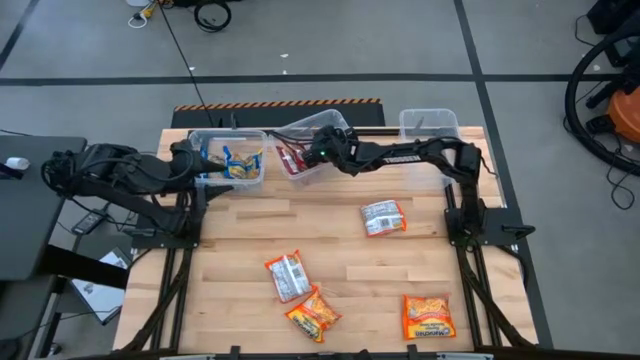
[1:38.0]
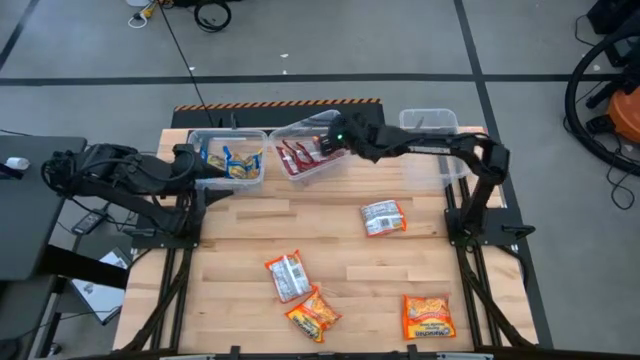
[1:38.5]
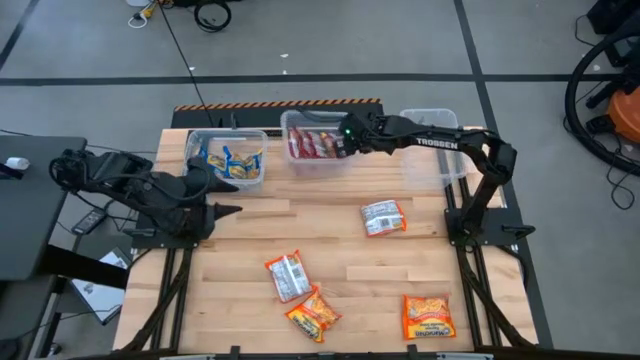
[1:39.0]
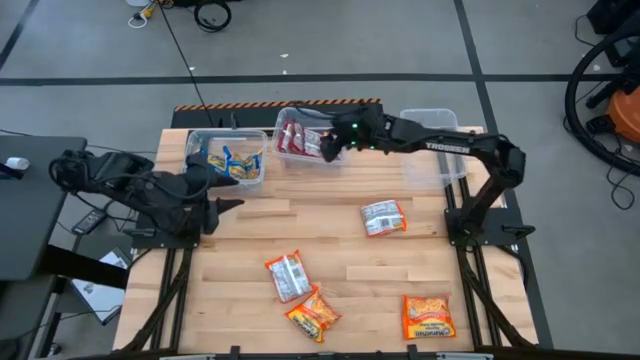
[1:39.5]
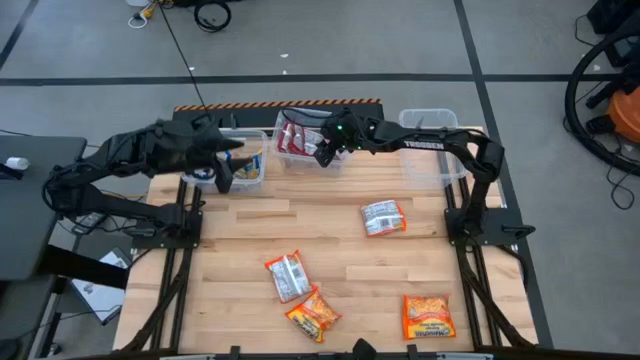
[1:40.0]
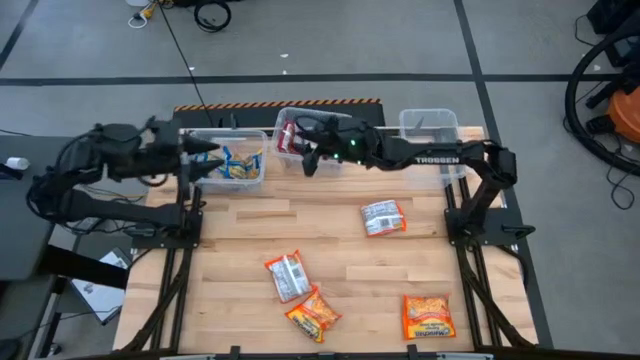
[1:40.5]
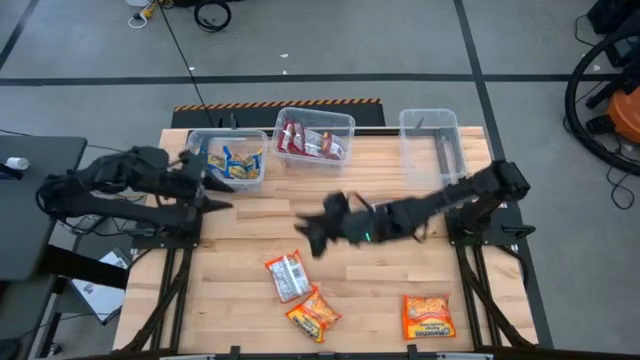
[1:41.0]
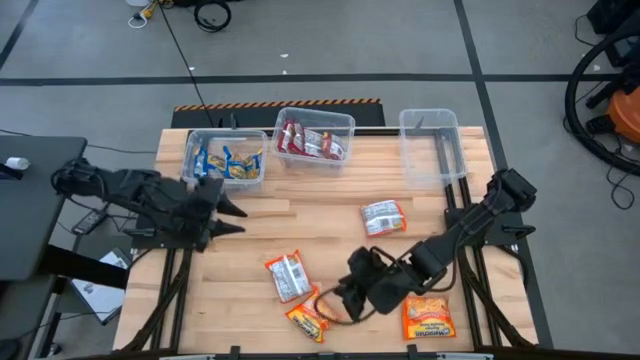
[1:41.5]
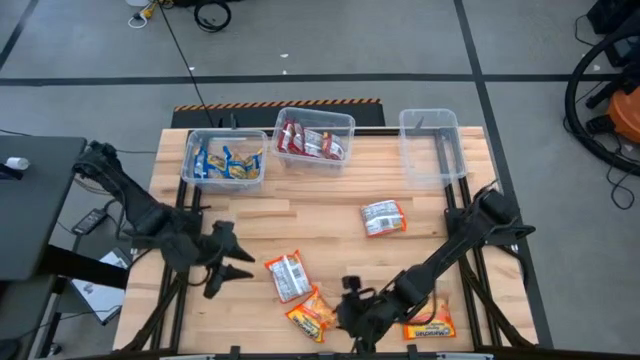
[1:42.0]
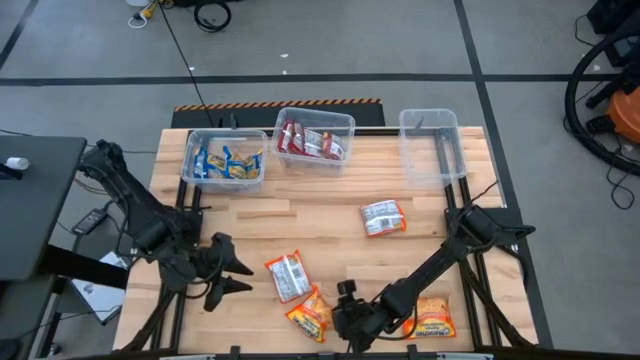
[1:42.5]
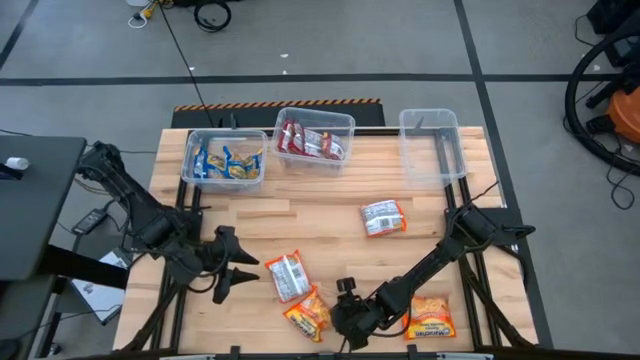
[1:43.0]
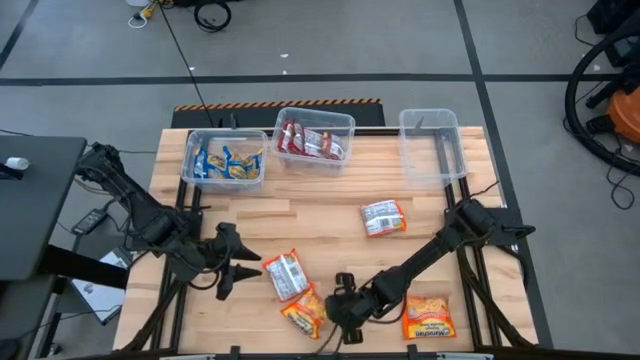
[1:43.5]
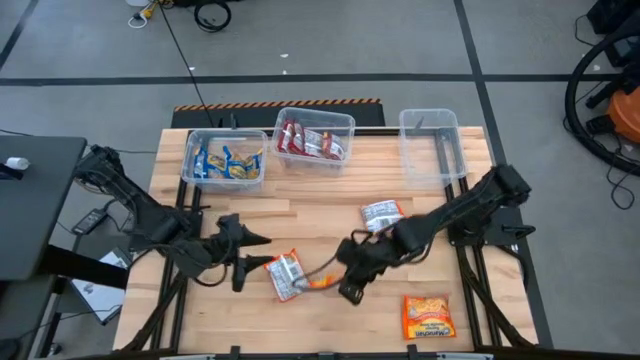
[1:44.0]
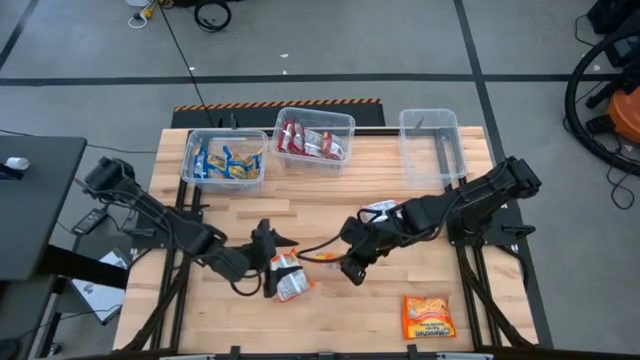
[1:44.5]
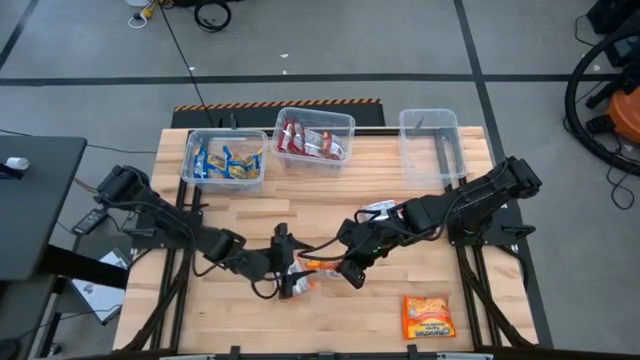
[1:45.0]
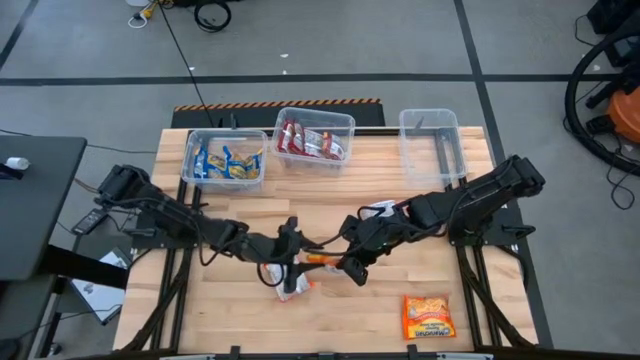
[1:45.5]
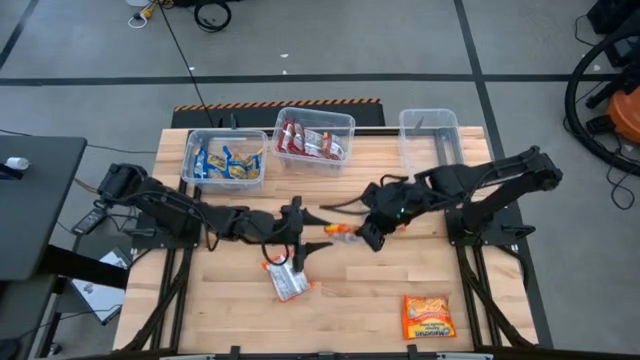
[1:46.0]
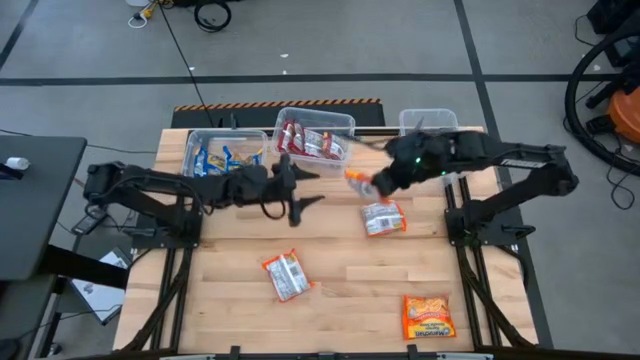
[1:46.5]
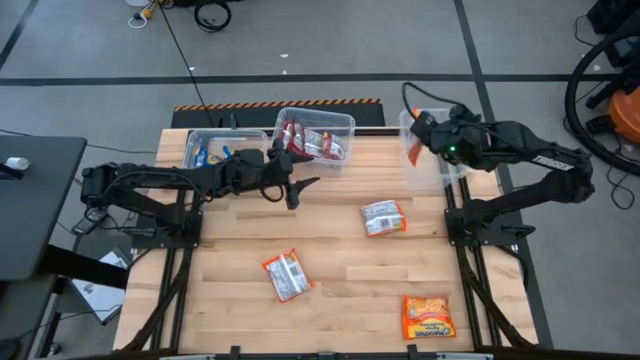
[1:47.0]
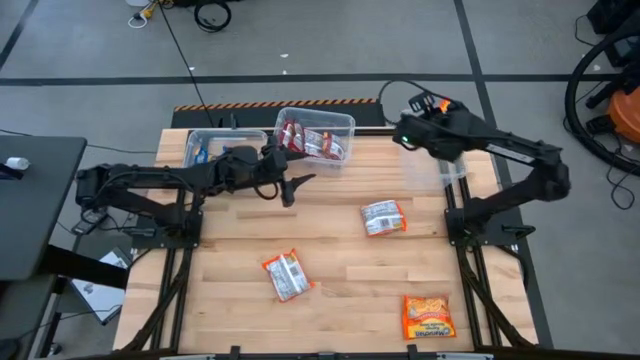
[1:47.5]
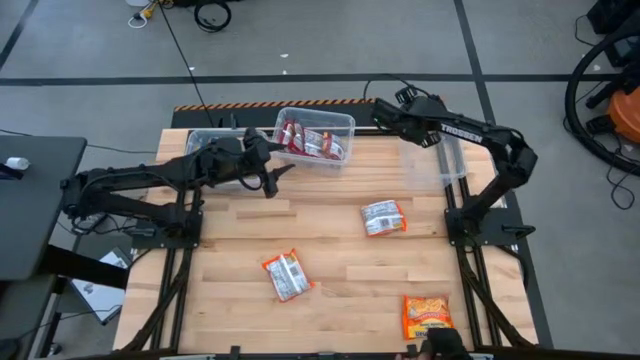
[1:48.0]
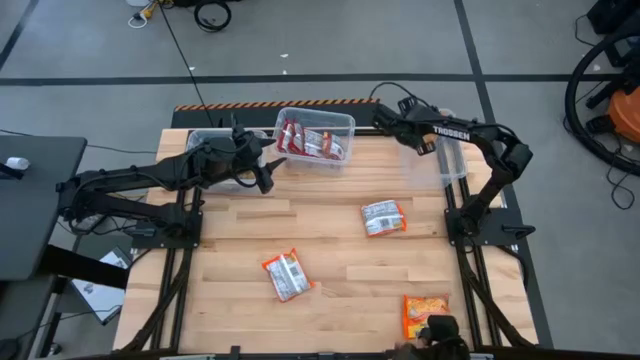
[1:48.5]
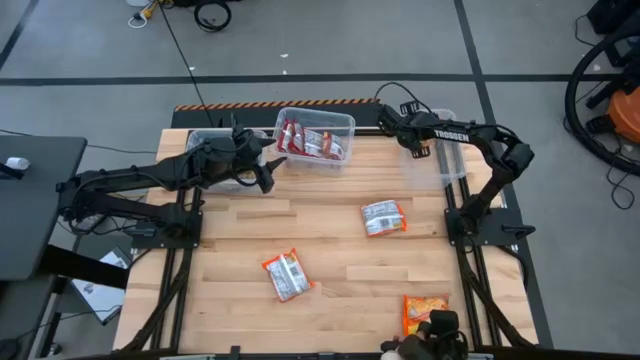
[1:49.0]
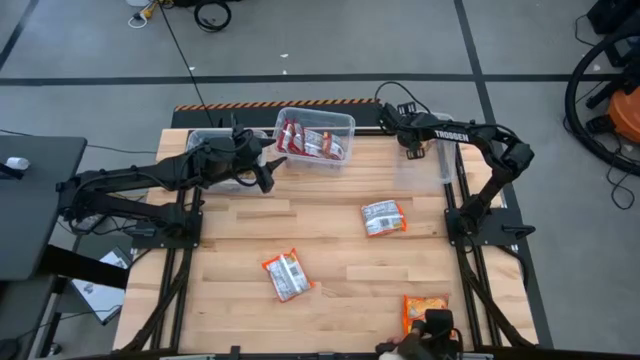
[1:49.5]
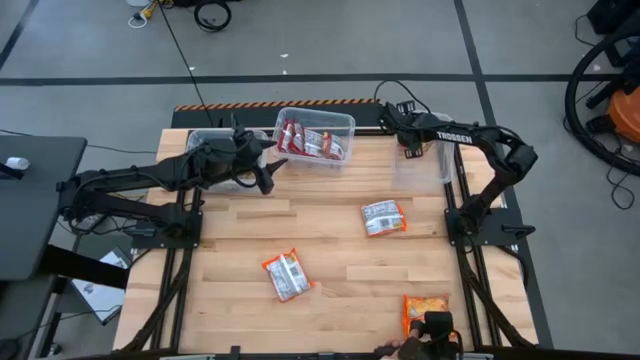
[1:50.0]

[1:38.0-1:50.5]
Task: Sort Maruchan noodles
Put the bottom left orange noodle pack into the right transparent bin

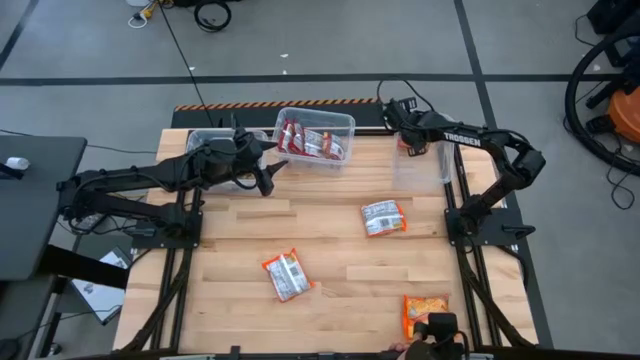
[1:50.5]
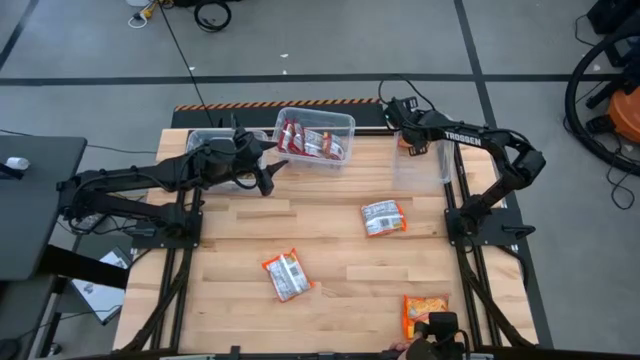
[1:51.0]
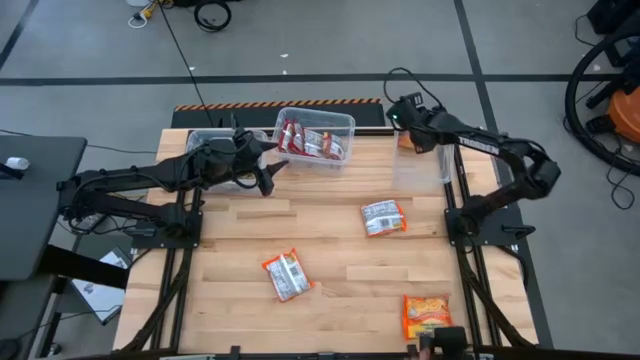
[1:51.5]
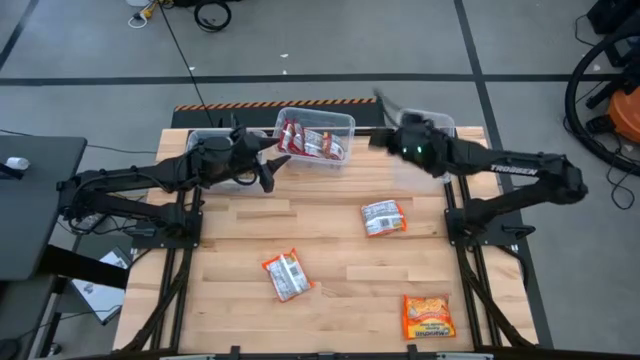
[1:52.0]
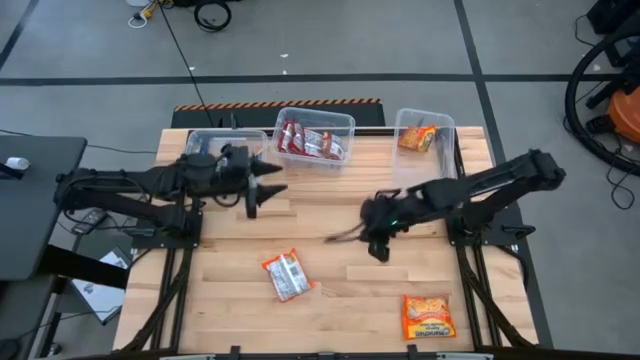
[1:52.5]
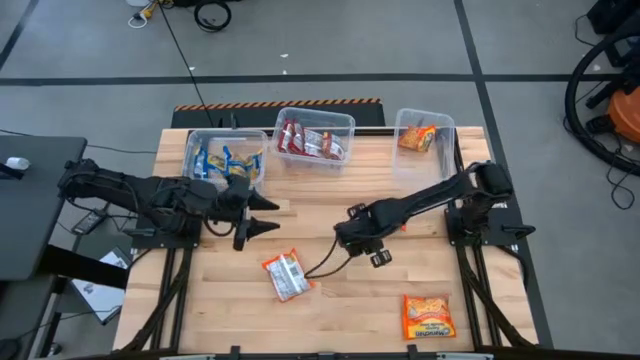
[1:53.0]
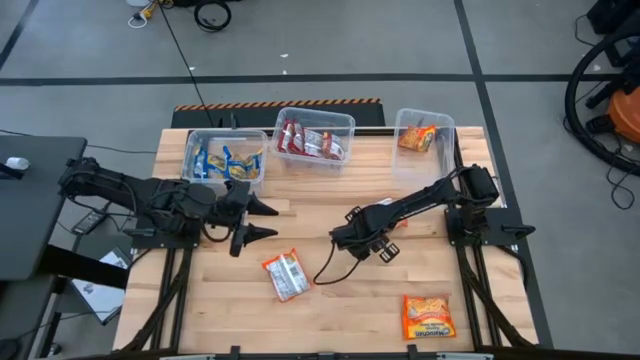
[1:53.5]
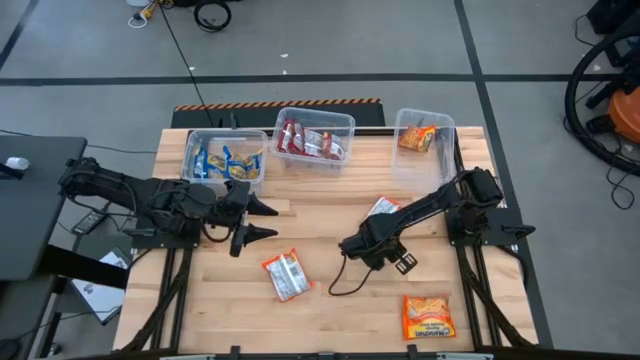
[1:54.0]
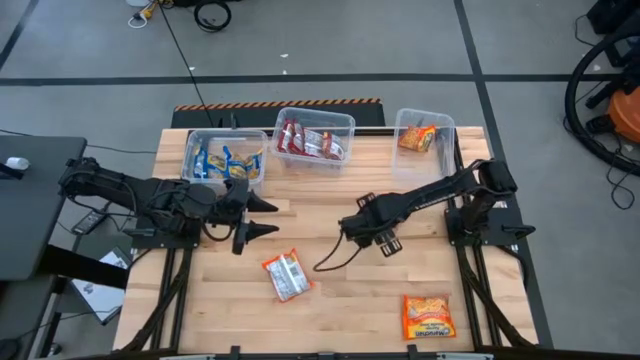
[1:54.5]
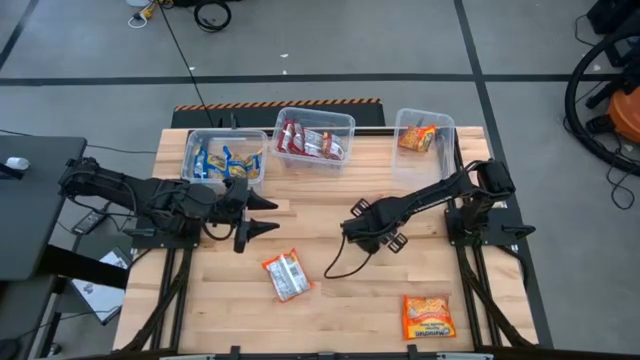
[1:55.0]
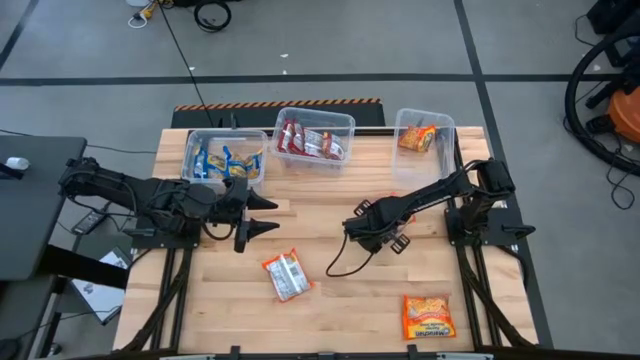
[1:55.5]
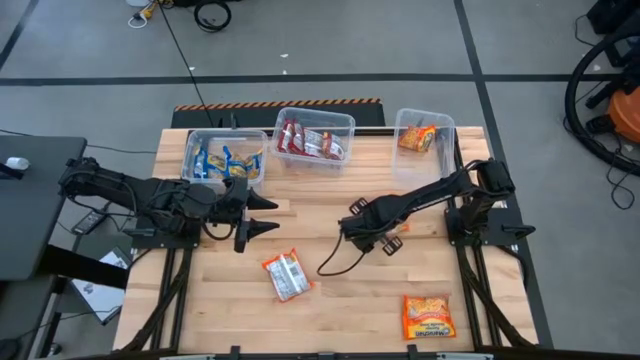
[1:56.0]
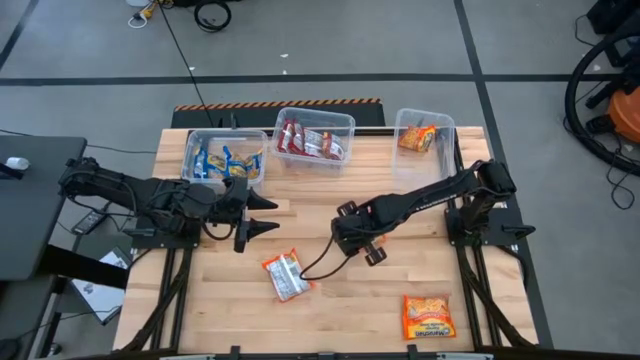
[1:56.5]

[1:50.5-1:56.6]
Put the top right orange noodle pack into the right transparent bin

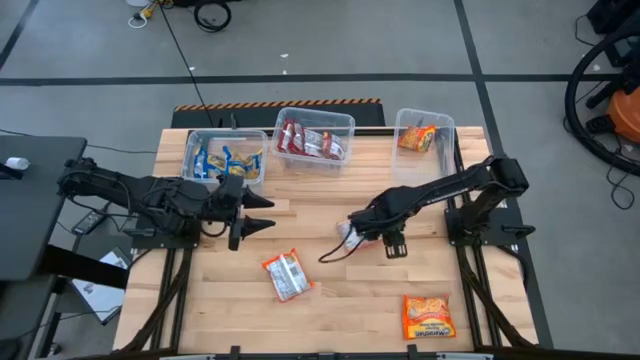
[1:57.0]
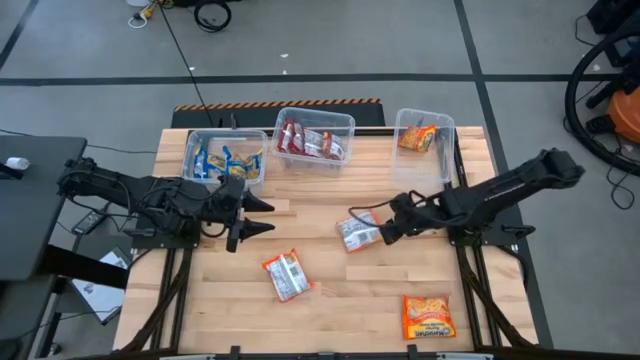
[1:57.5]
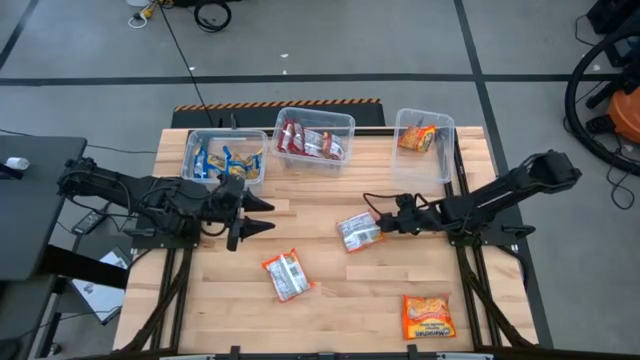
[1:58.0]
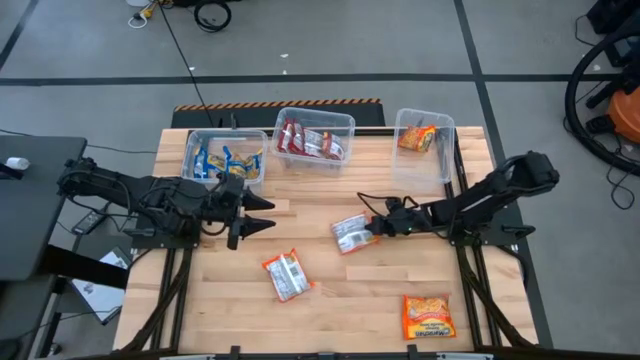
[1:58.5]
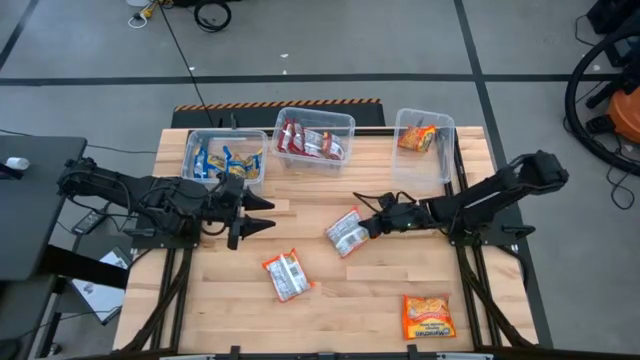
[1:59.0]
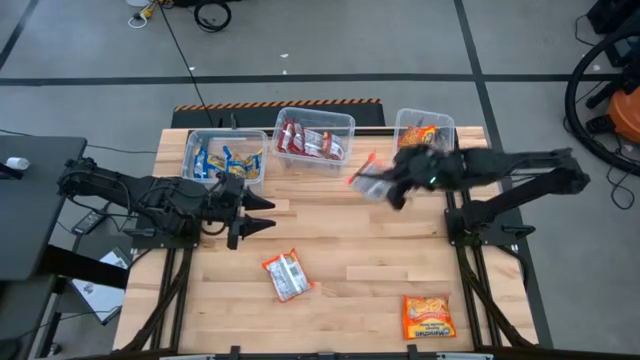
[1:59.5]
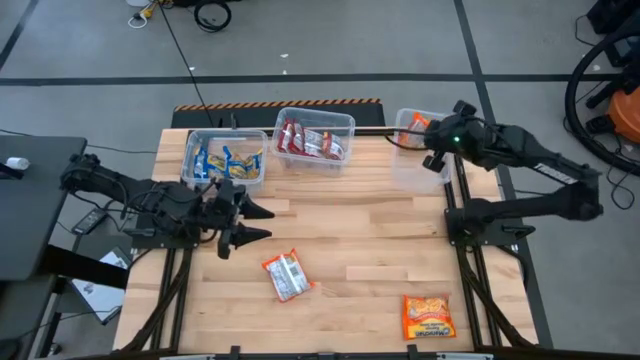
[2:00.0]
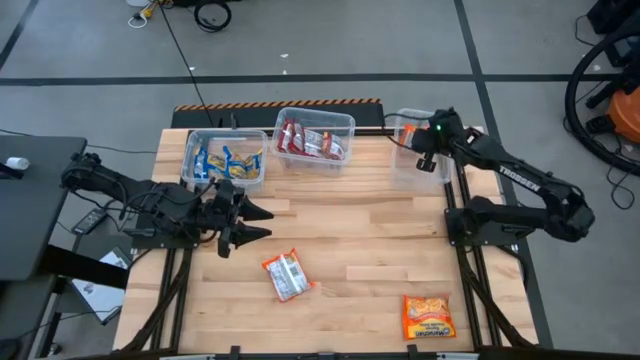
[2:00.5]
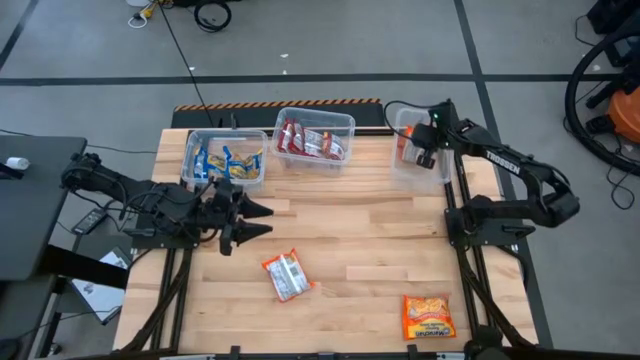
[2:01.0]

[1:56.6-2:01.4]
Put the top right orange noodle pack into the right transparent bin
